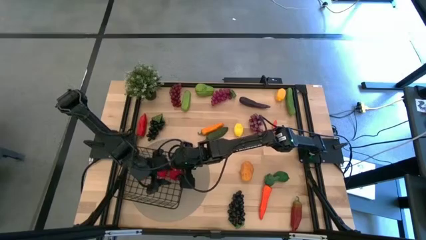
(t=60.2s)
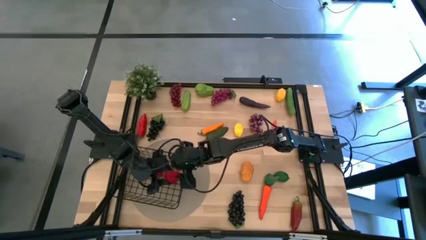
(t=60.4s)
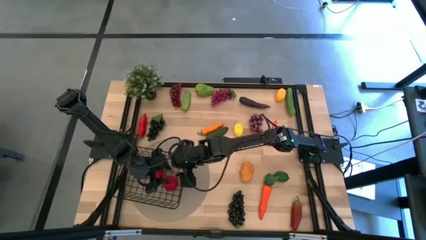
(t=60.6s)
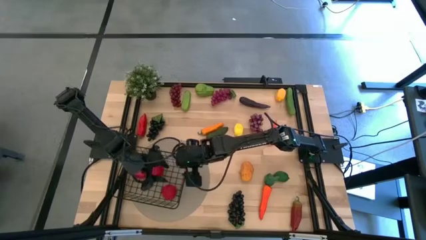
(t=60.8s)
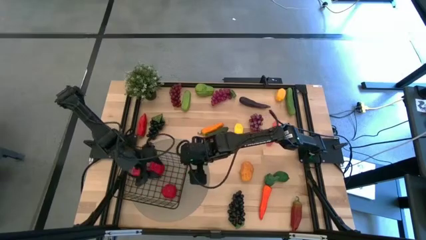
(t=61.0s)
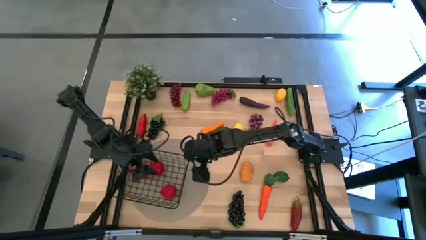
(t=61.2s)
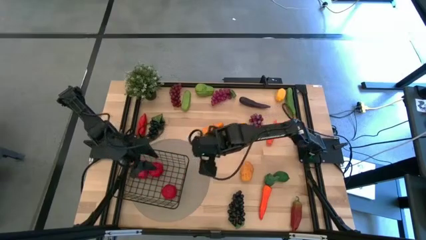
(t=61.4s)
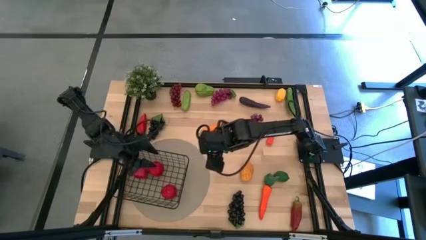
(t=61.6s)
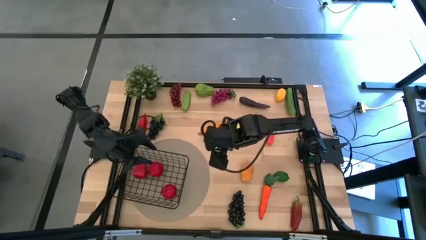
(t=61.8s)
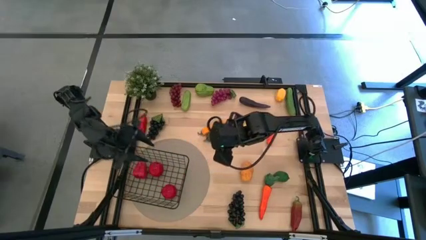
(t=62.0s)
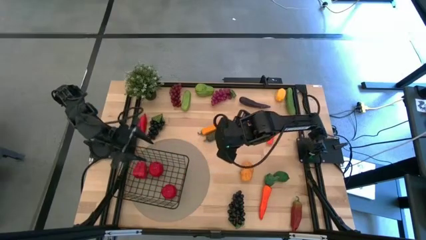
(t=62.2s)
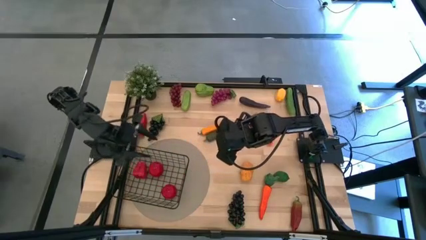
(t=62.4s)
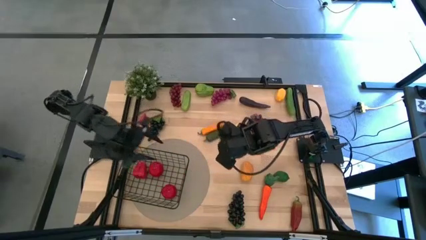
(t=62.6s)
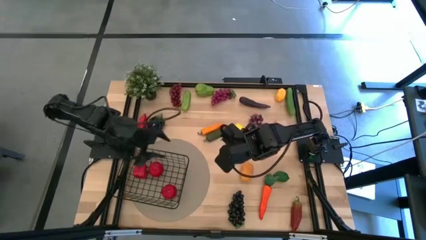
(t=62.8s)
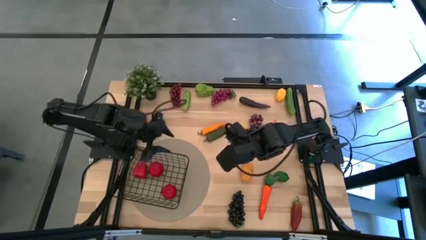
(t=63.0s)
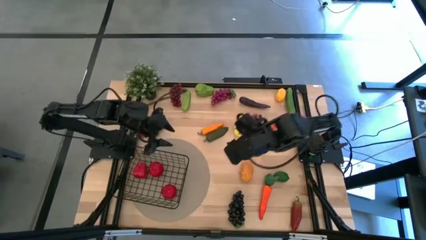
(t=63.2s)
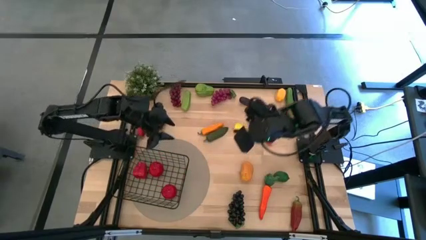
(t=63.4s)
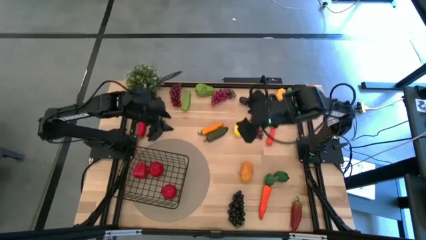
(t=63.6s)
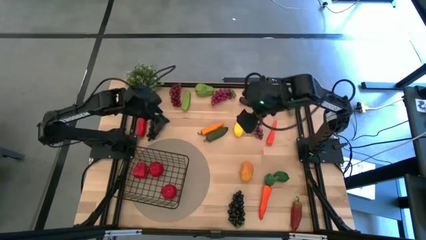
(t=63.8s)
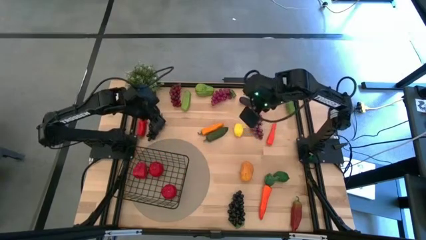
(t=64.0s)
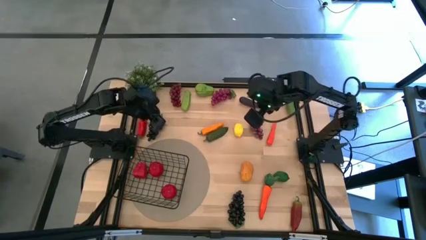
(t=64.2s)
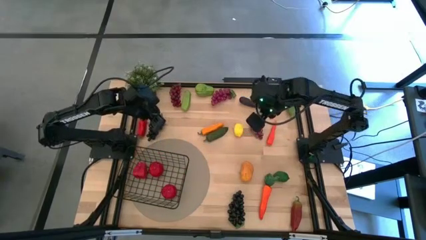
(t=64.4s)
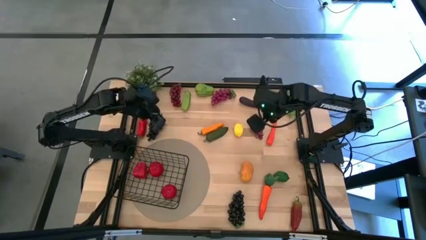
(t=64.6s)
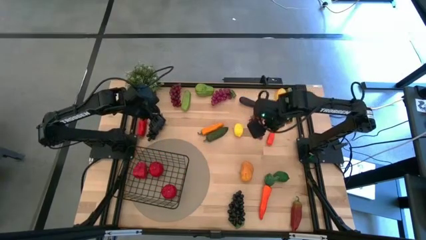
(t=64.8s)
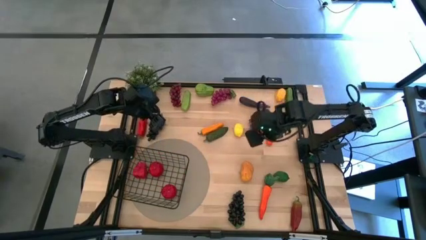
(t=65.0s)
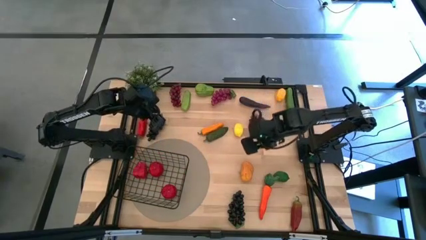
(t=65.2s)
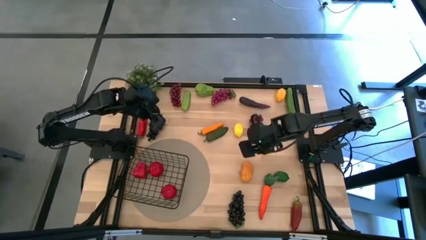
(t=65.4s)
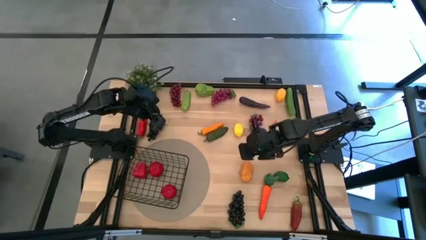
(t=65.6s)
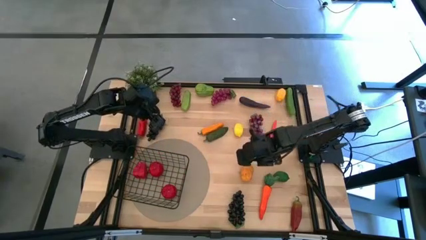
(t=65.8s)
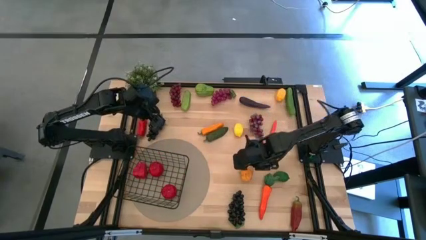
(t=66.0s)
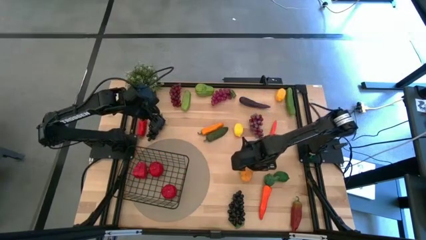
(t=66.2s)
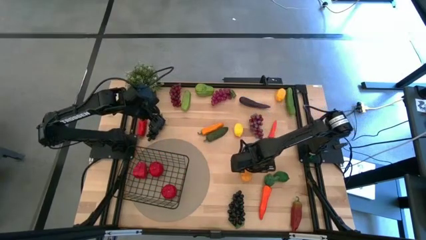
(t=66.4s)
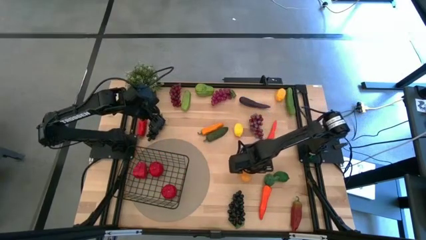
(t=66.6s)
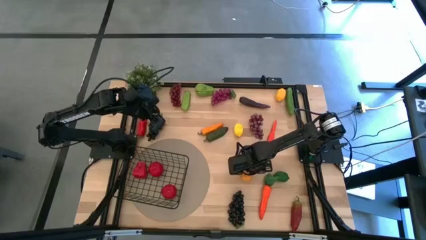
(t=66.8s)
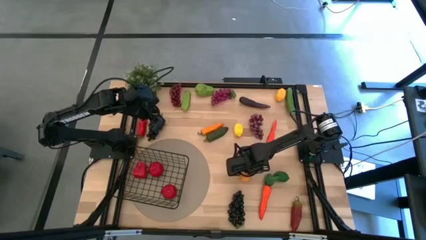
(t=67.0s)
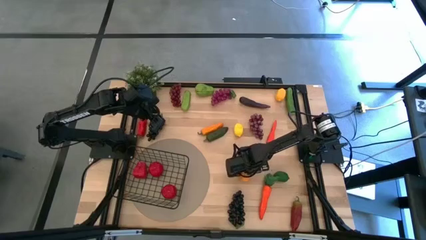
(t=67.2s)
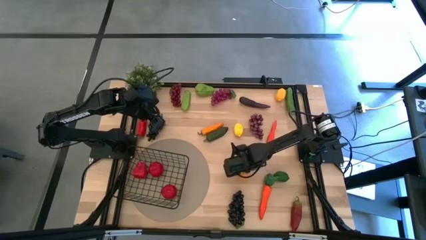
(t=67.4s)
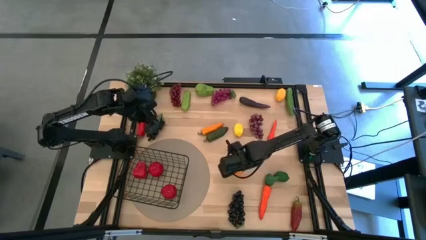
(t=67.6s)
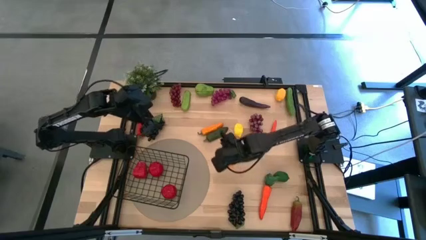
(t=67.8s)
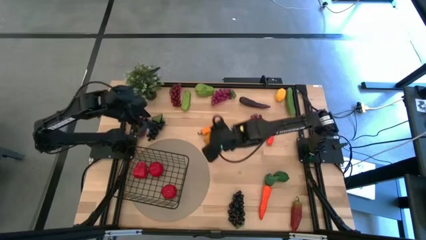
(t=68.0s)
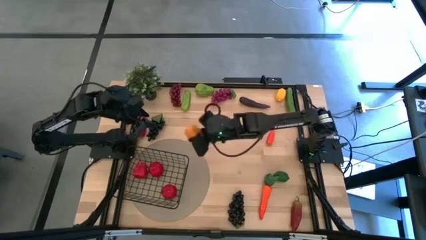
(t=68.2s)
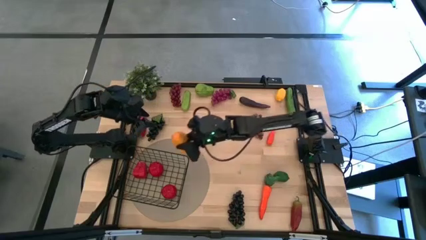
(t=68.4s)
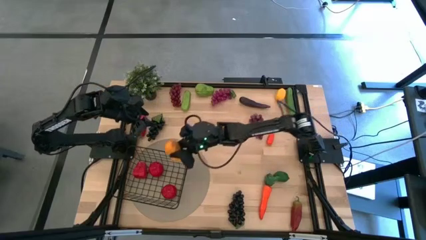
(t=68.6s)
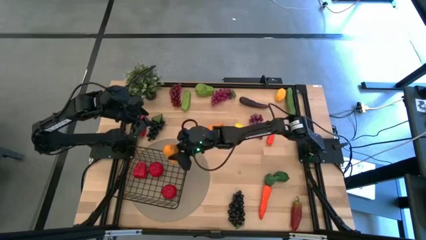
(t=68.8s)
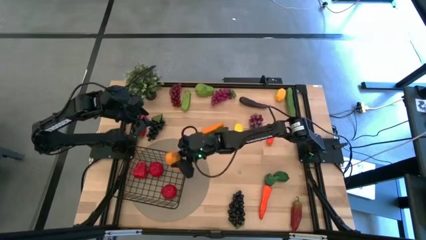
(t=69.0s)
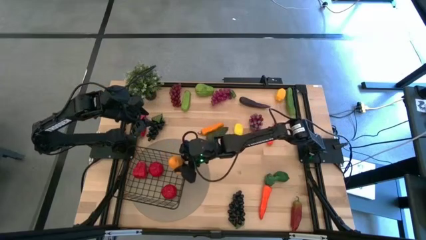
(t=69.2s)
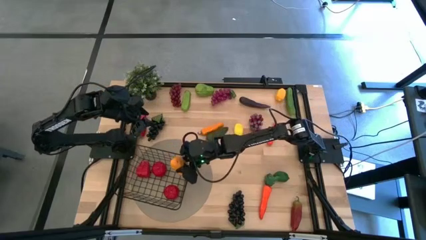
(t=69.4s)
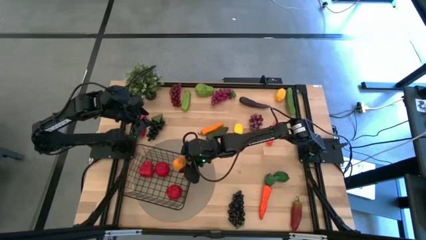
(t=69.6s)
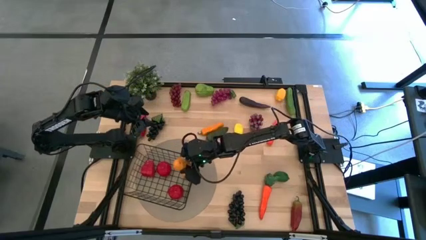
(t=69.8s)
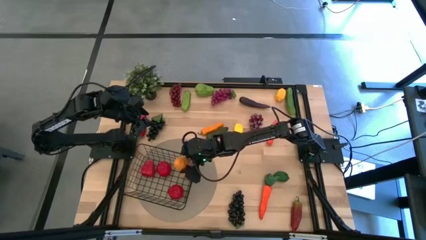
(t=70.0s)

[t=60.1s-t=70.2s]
Task: Build produce basket
Put the brown potato into the black wire basket
